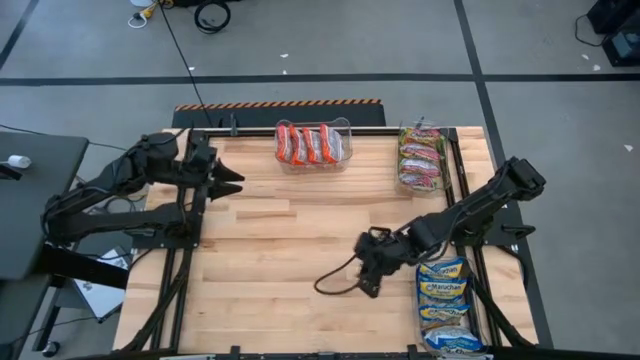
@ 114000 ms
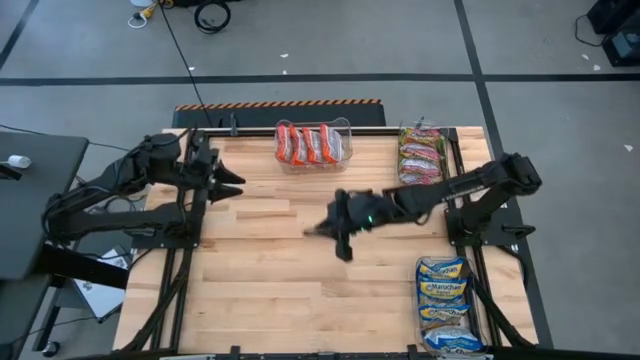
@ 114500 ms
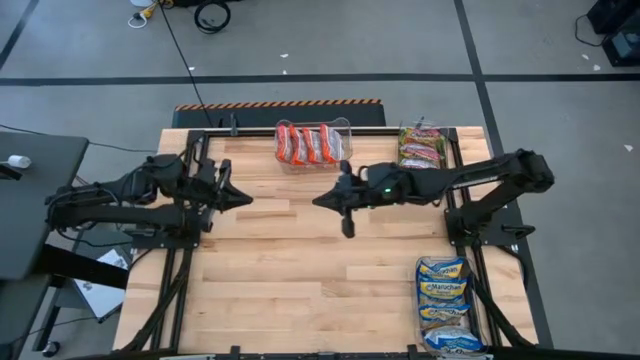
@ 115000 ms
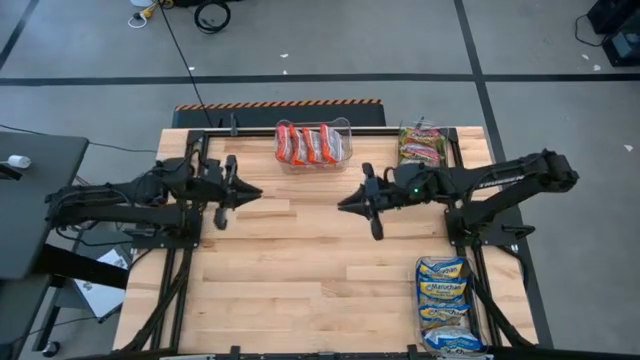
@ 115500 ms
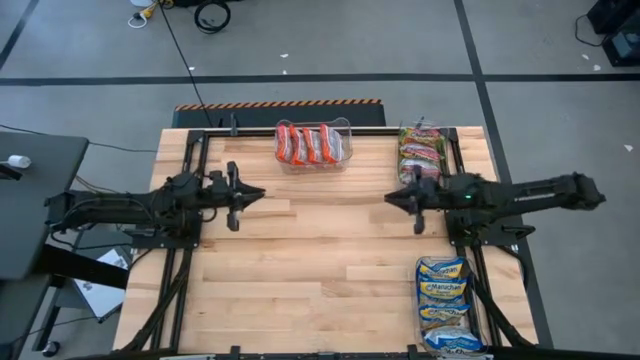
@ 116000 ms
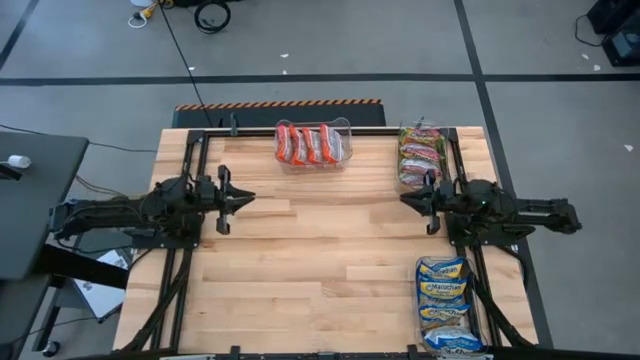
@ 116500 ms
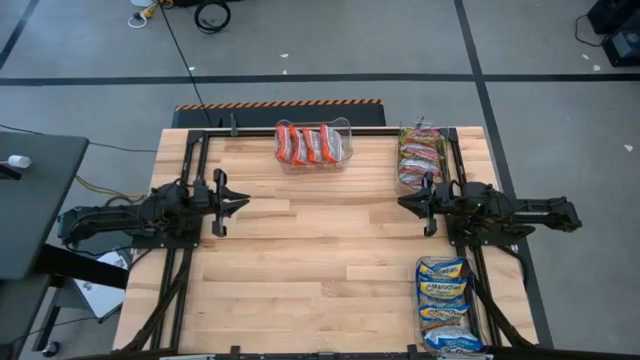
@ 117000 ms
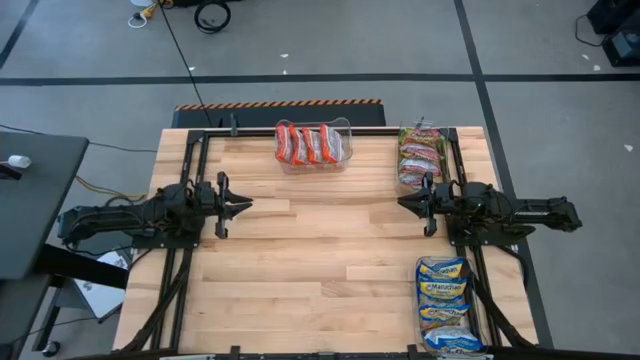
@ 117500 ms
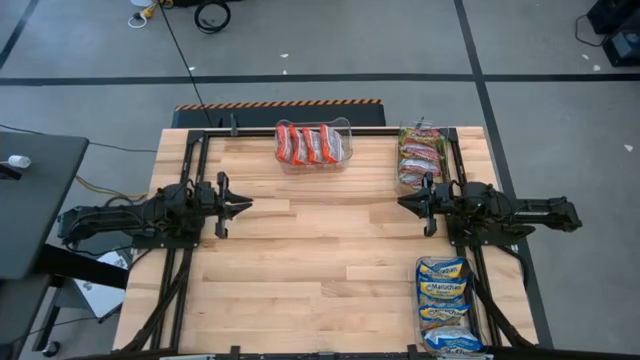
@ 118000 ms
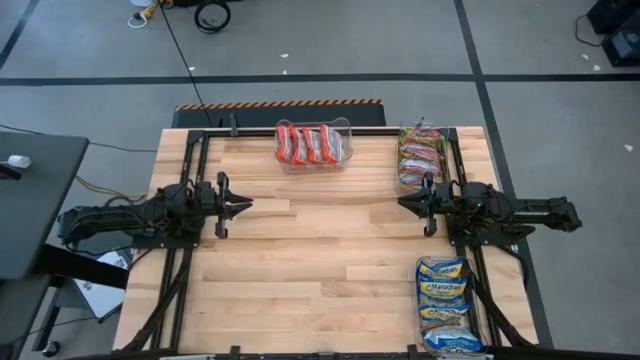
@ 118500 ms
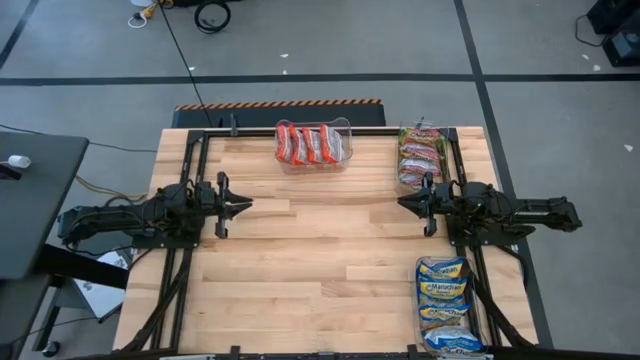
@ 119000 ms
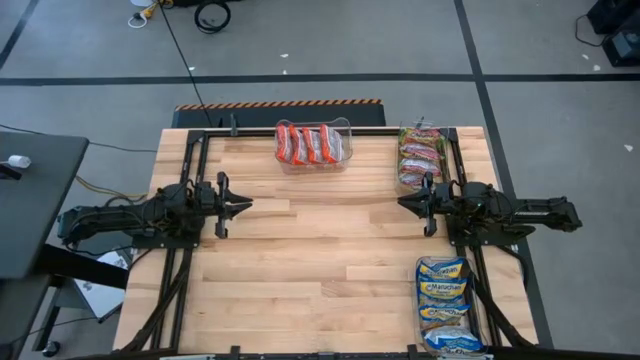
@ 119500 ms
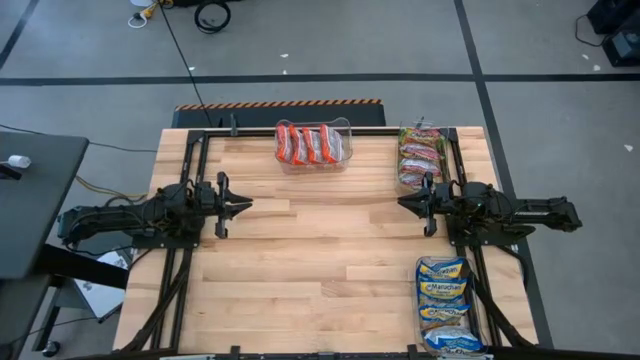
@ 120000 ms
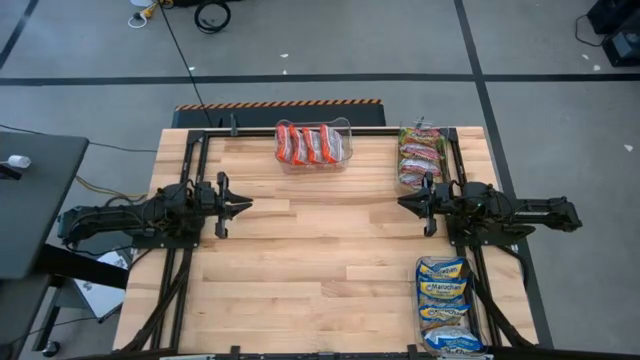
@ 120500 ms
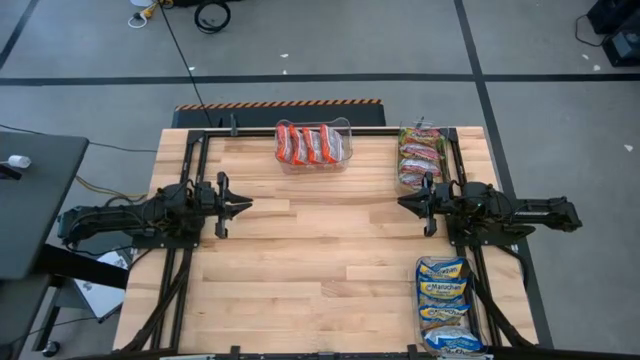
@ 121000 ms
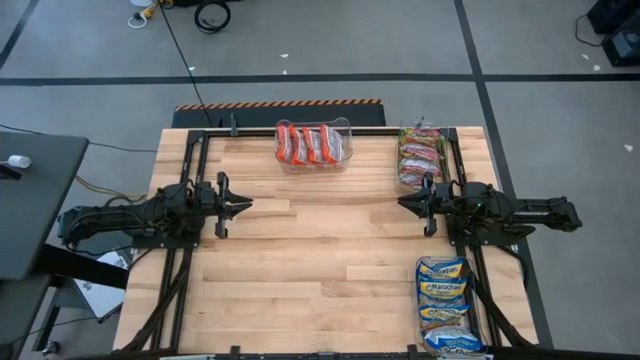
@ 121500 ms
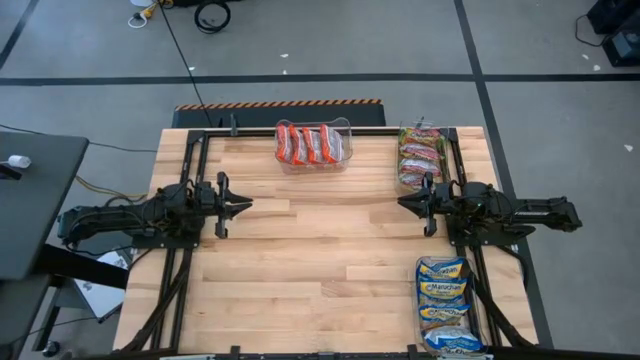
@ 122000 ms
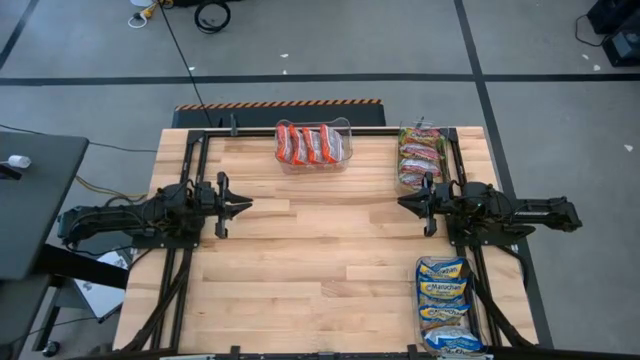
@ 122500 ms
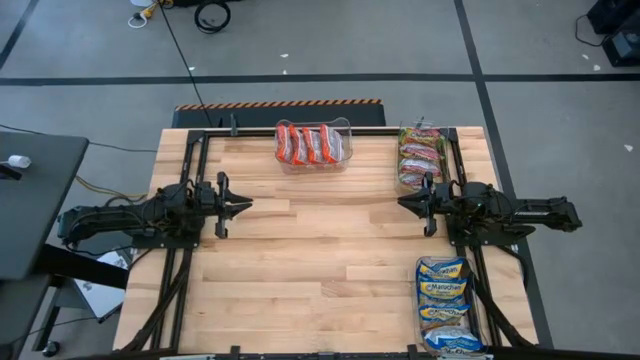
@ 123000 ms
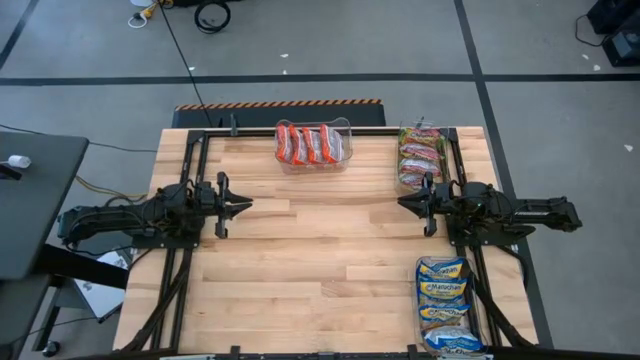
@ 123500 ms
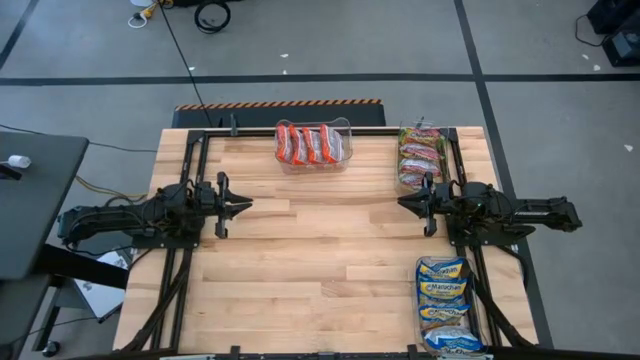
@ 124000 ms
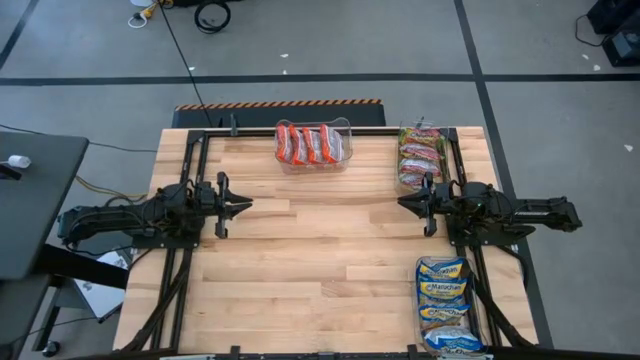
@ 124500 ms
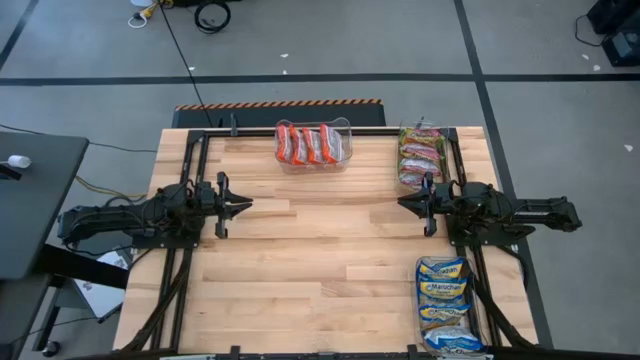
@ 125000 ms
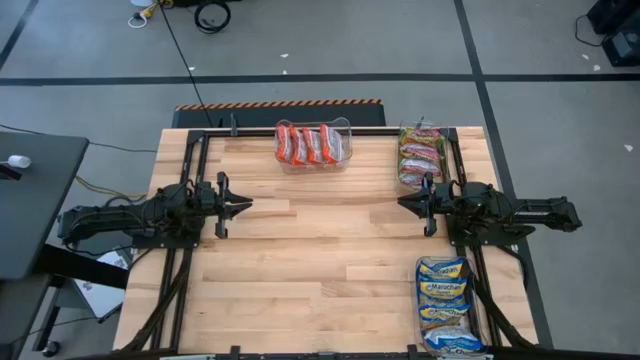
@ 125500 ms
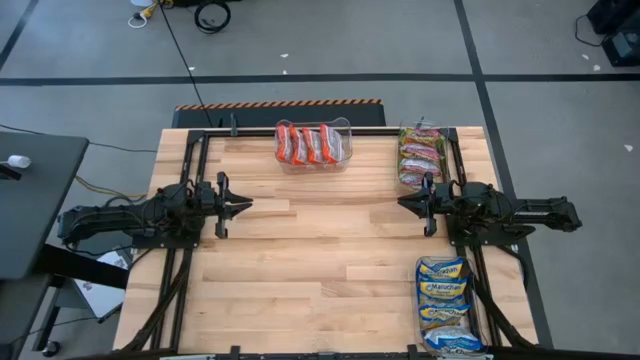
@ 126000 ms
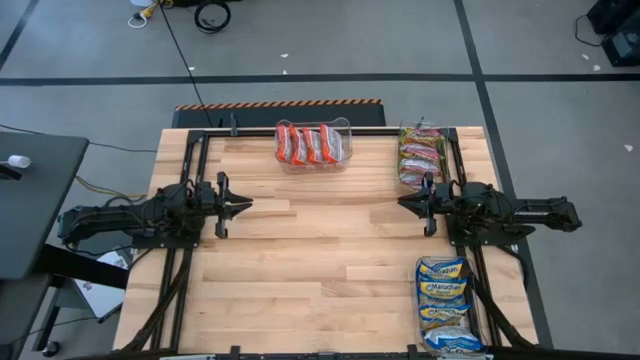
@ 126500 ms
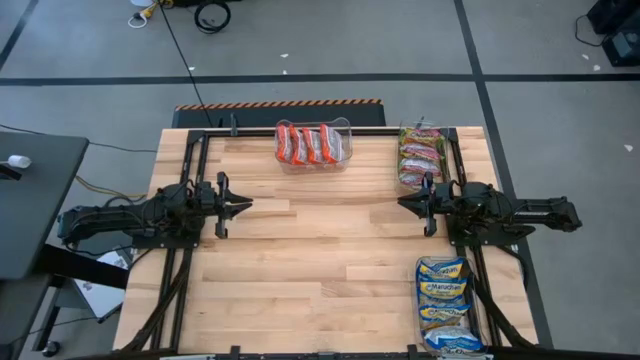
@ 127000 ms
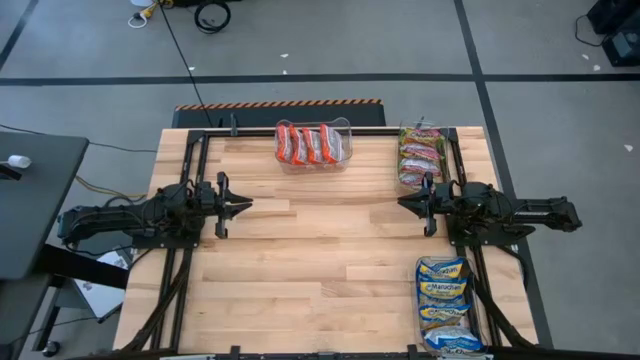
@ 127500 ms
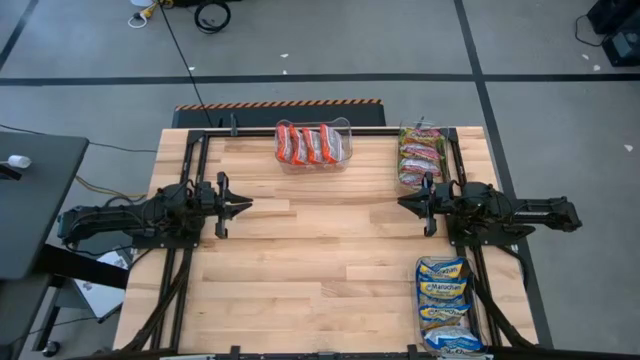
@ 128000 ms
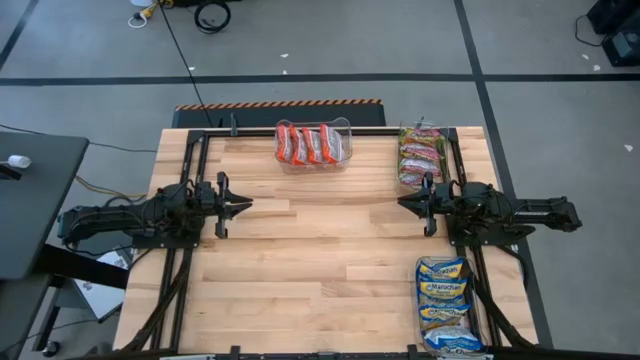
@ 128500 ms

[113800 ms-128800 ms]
Task: Sort Maruchan noodles
Return to Home Position

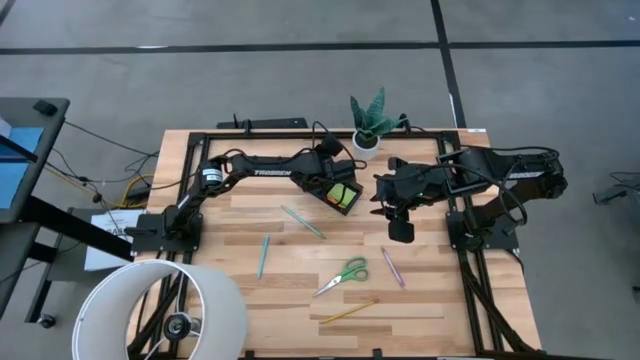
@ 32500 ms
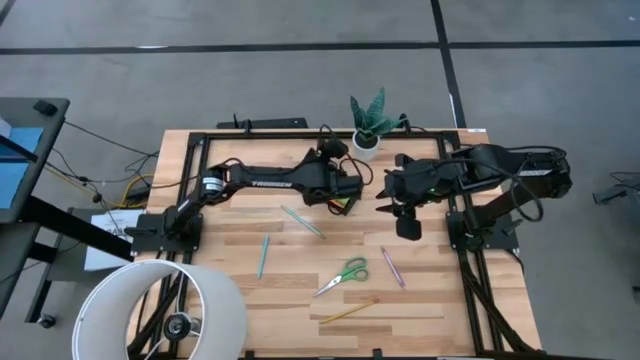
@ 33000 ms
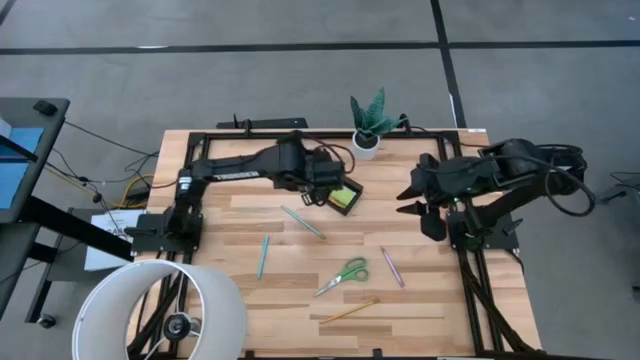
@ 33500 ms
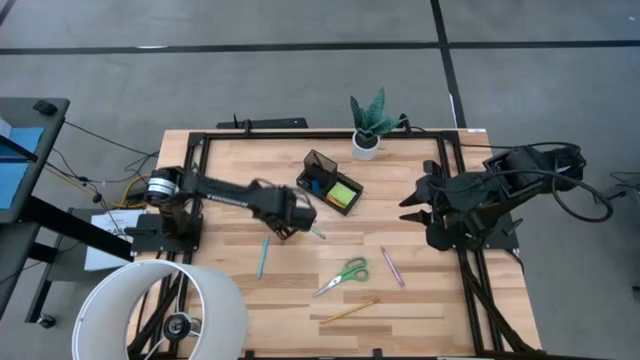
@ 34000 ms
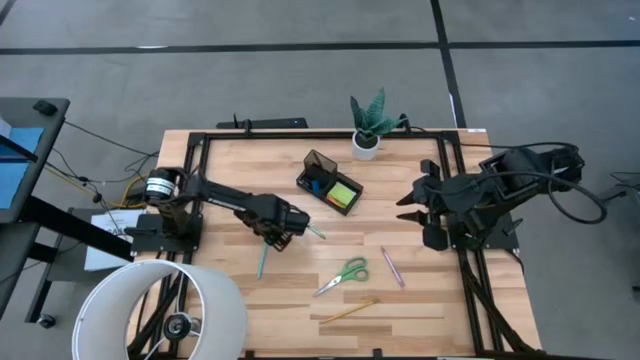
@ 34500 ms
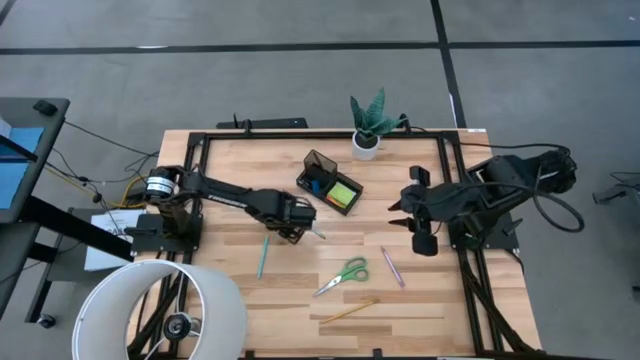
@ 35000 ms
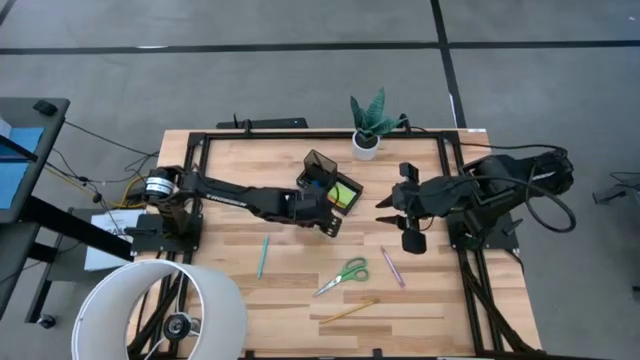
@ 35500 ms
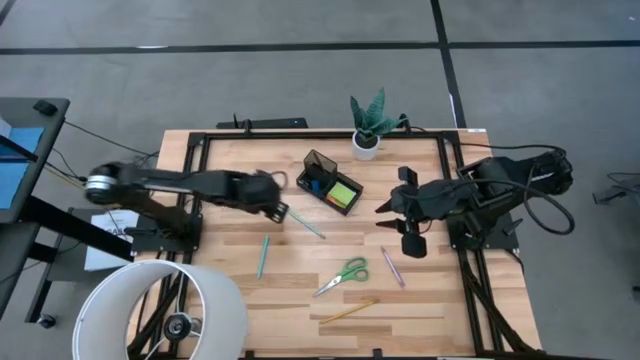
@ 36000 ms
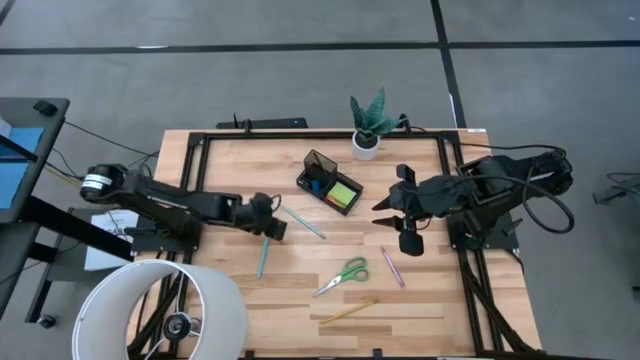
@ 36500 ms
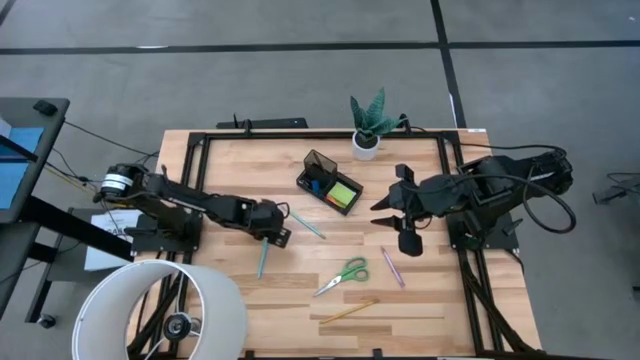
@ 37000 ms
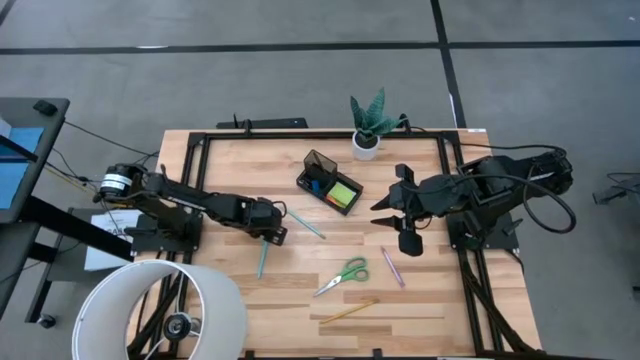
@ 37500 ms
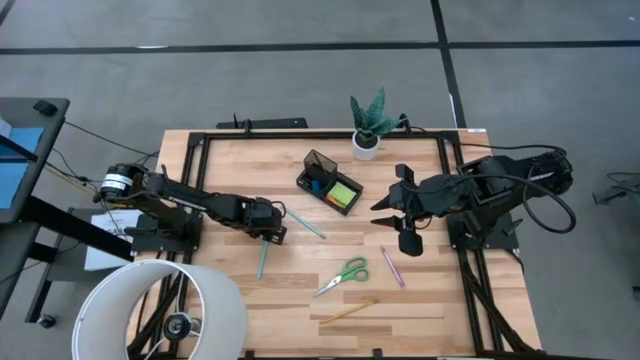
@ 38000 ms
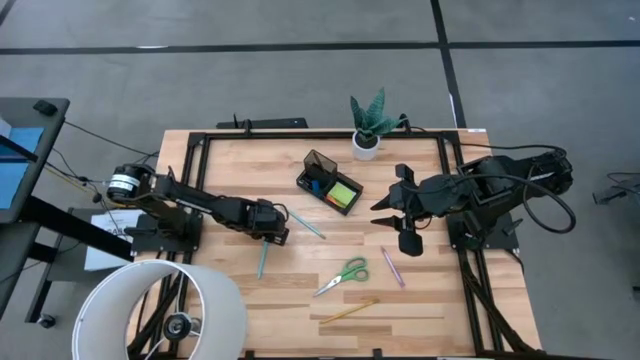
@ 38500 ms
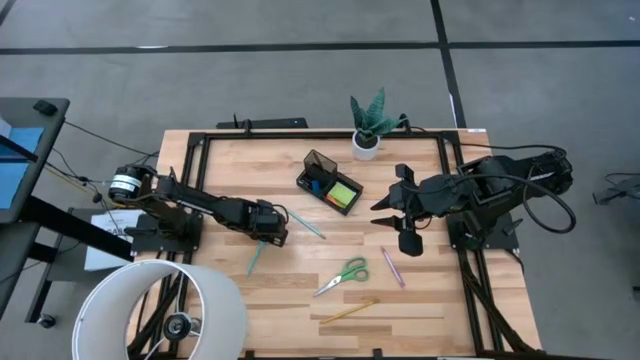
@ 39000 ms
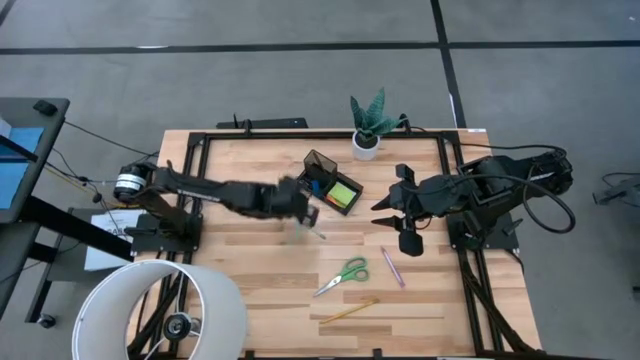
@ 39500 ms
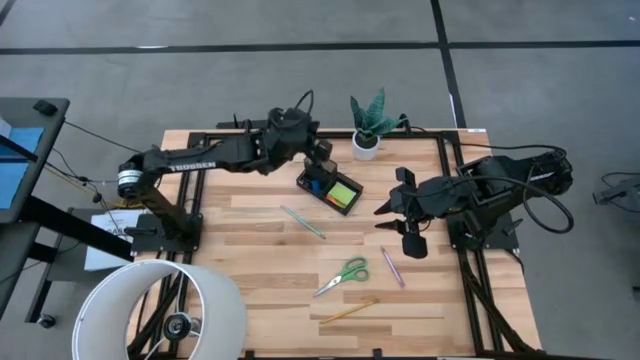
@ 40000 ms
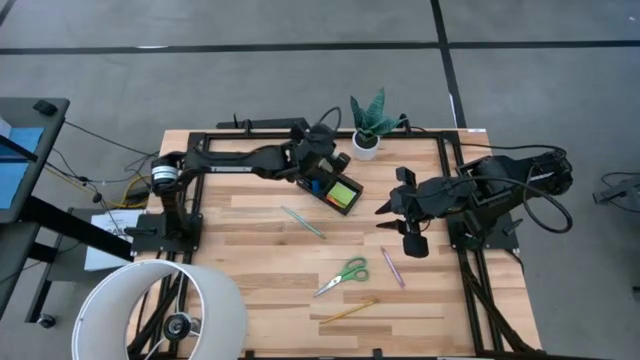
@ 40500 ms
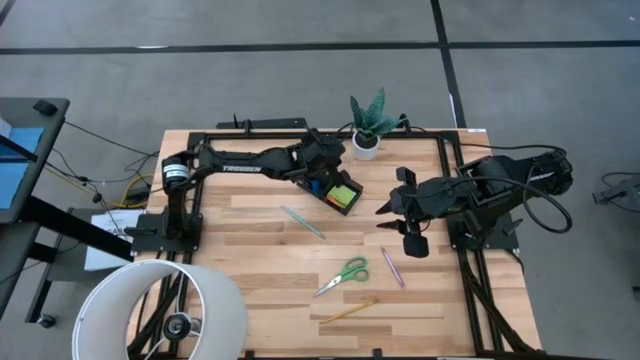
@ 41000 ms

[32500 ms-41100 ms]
Task: Pick and place office supplies into organizer
Put the light blue ballpen into the black desk organizer
